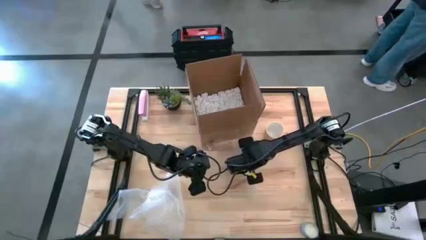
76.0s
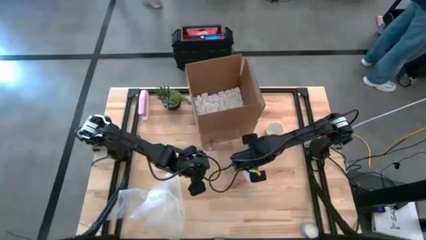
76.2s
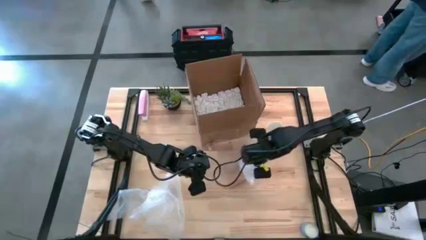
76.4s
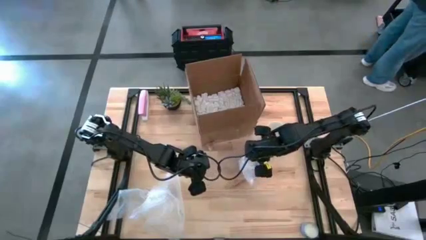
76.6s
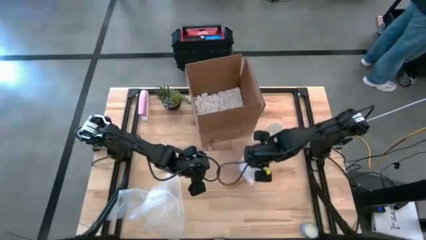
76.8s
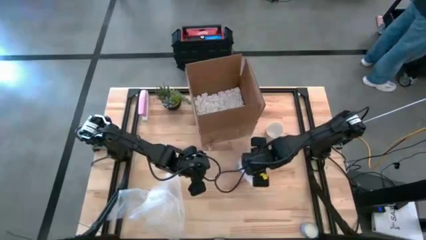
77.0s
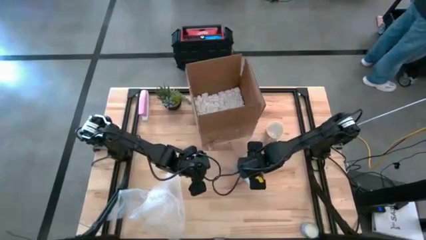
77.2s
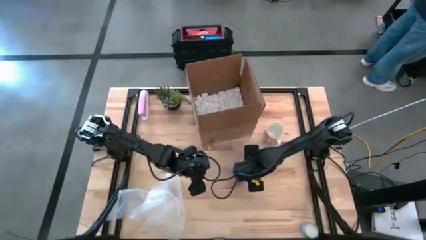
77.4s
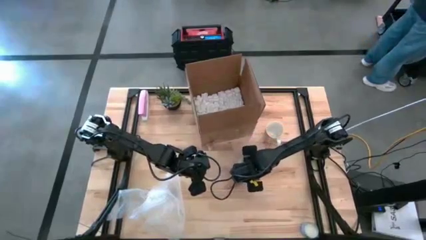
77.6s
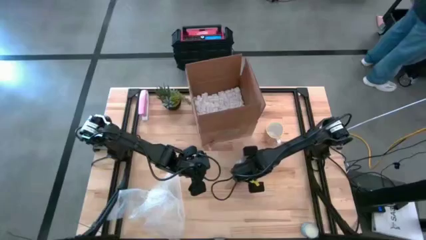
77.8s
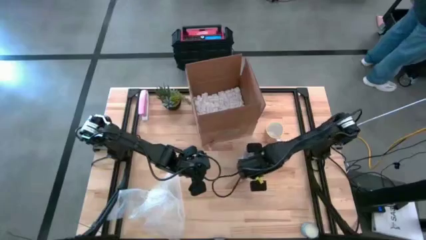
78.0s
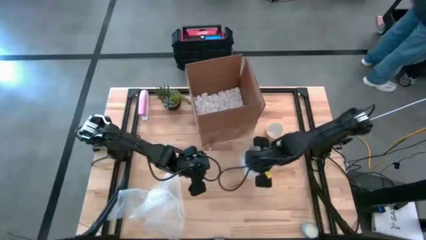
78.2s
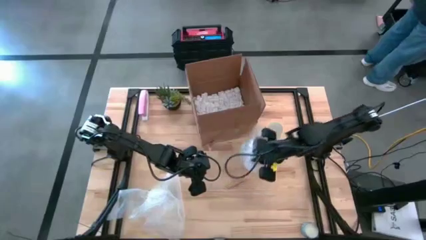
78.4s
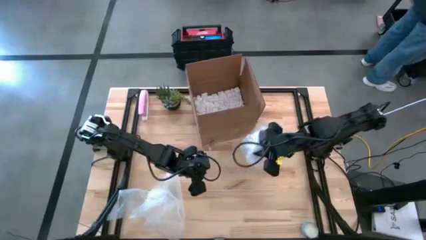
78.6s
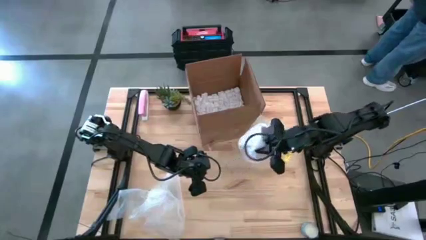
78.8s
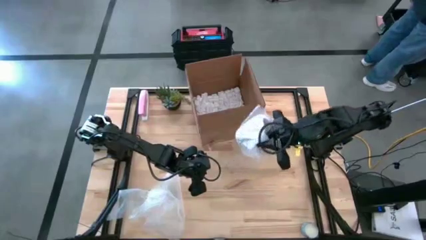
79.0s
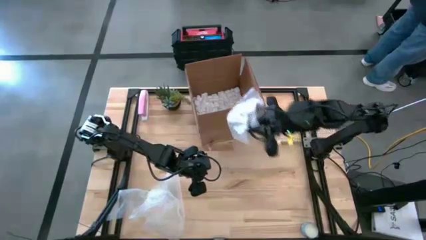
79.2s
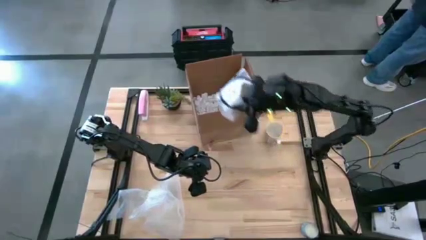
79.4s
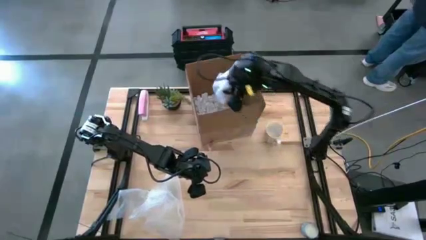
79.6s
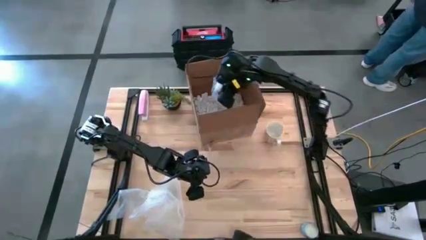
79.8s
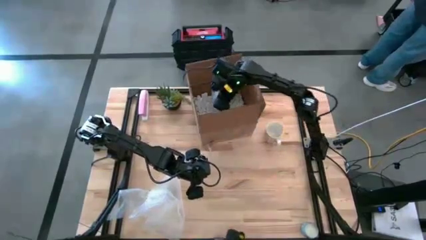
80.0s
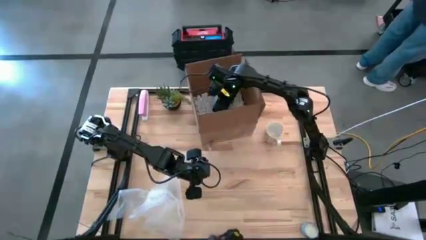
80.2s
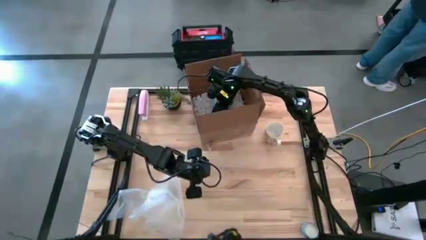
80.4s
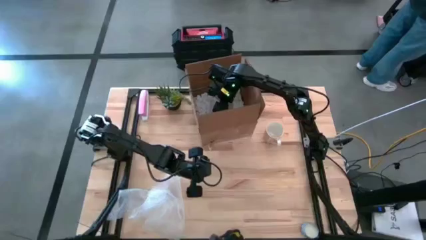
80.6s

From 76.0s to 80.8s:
Task: wrap mug
Put the wrapped gray mug into the box

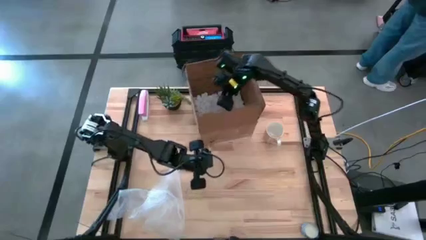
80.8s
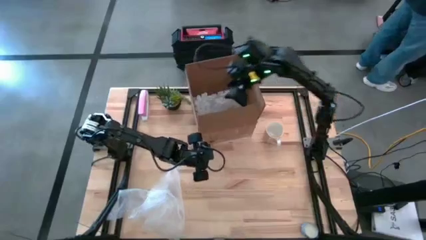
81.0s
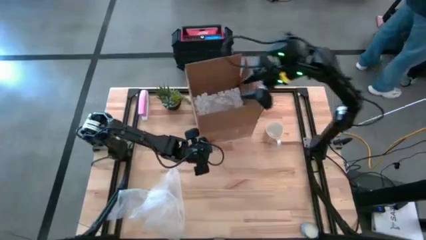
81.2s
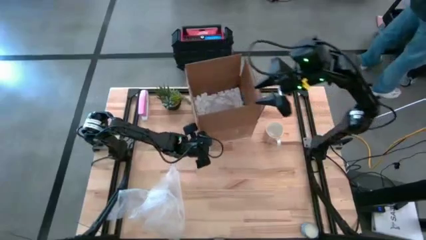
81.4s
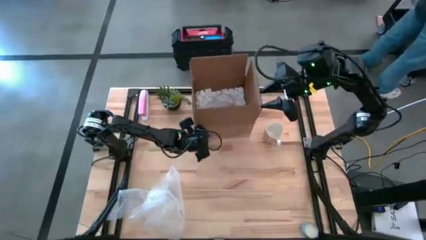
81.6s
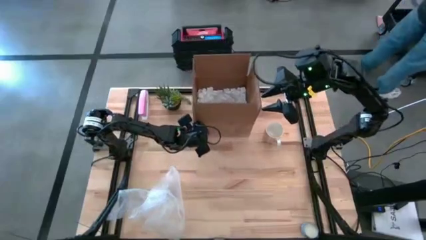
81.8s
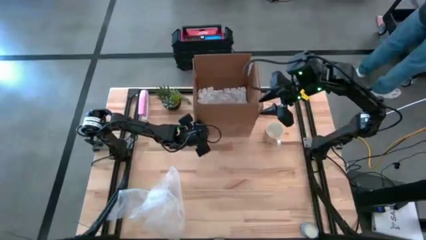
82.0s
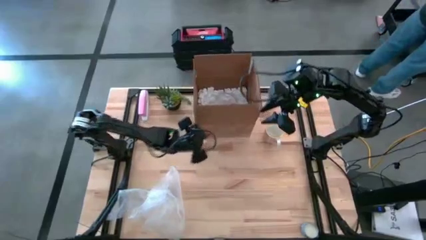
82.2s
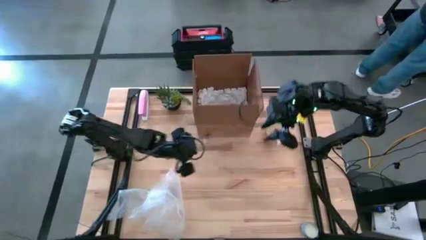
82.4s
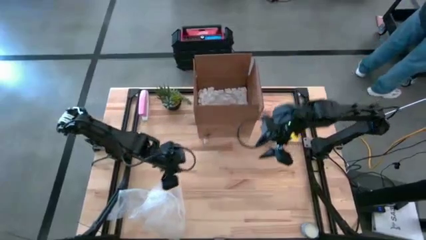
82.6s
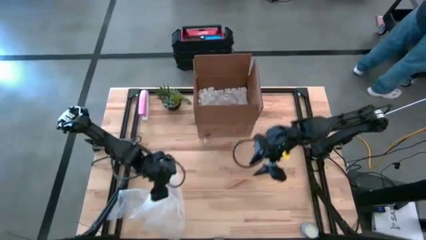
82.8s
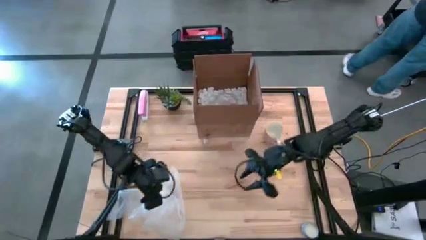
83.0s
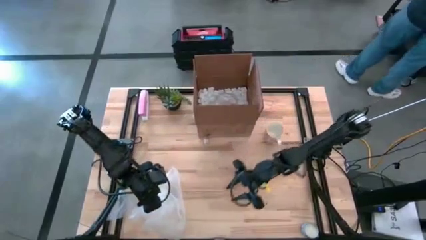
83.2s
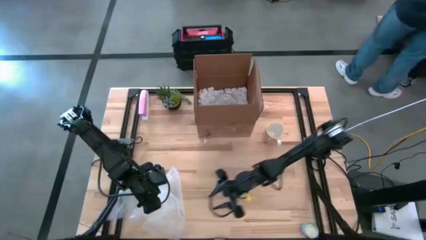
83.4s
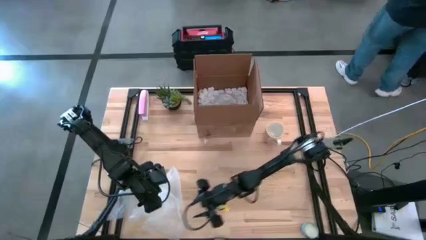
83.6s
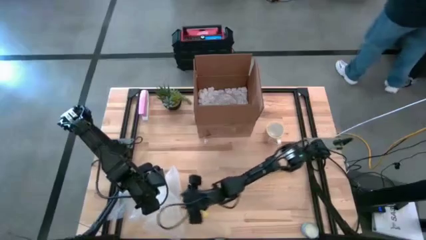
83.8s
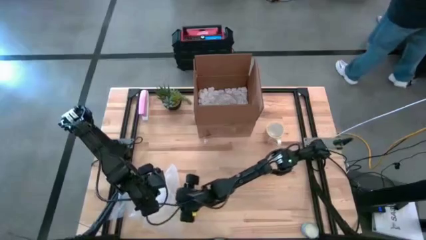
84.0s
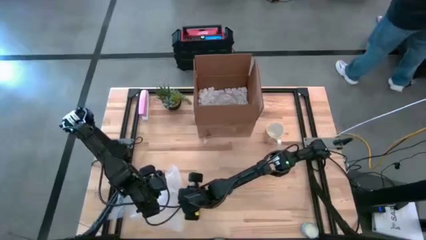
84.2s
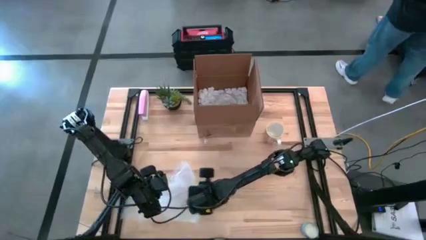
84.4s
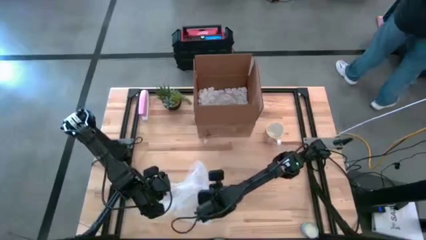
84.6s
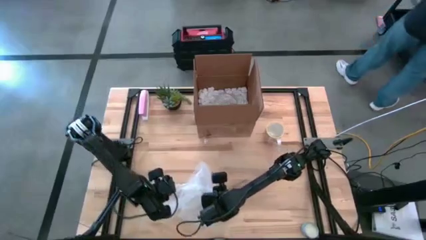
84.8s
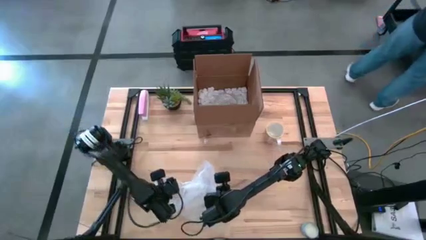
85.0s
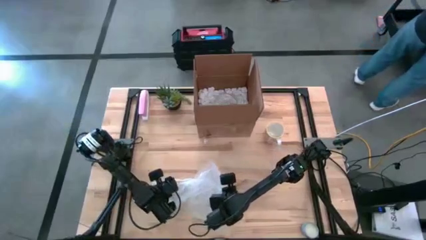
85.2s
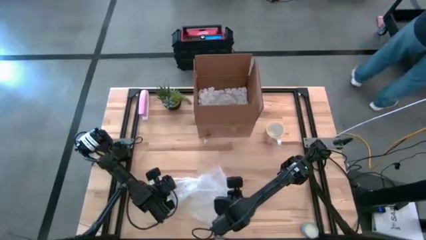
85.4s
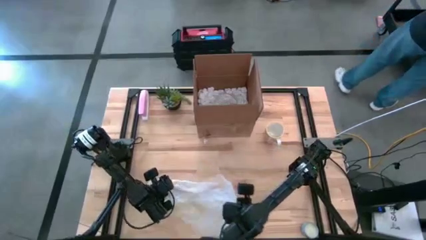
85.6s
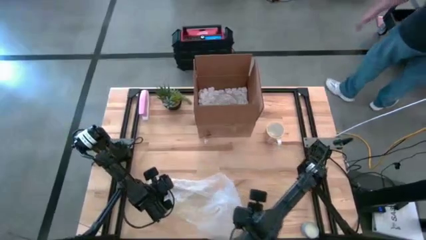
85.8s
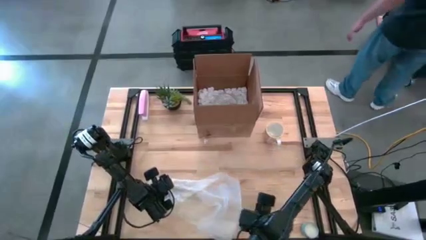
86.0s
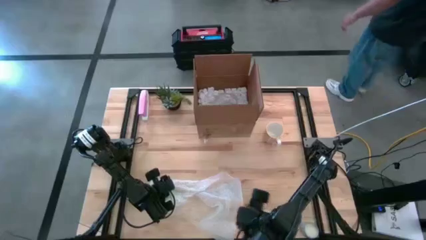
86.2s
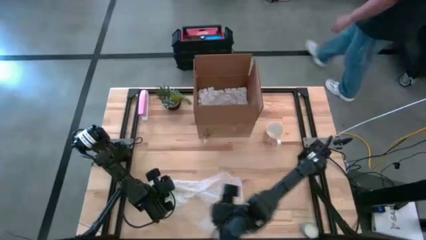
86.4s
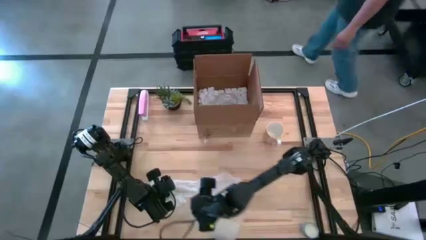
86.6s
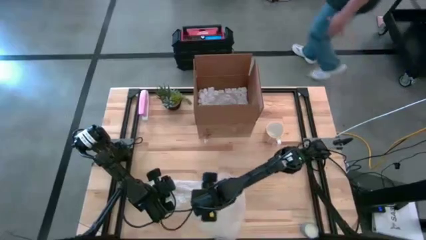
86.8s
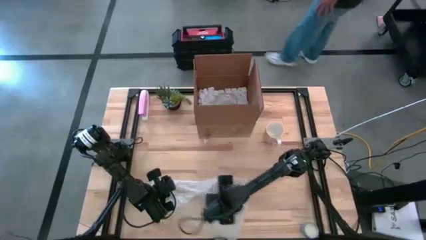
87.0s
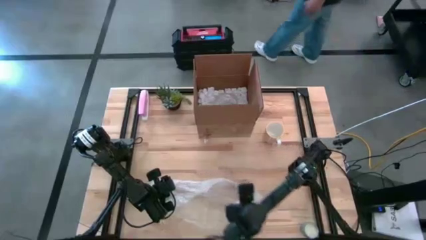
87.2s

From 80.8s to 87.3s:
Prepare the bubble wrap
